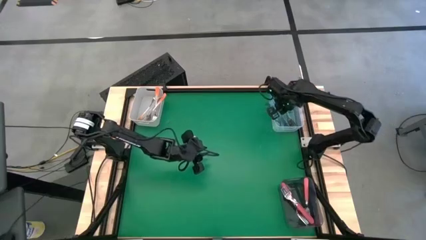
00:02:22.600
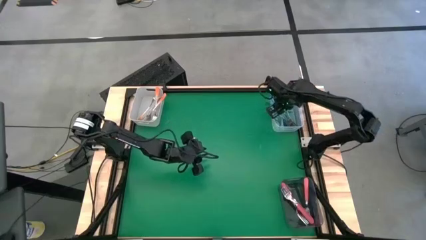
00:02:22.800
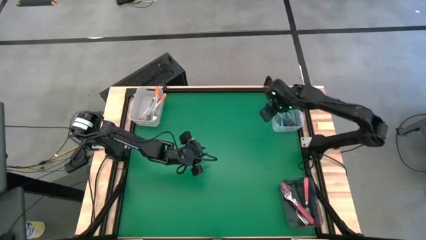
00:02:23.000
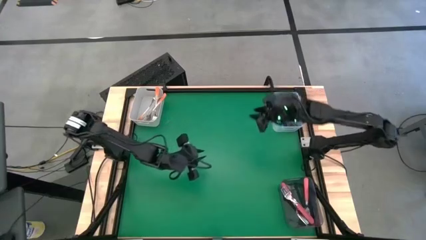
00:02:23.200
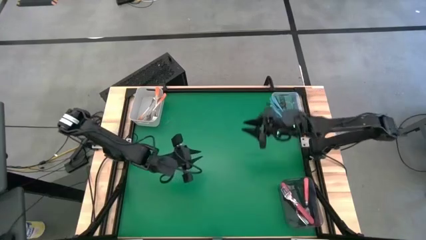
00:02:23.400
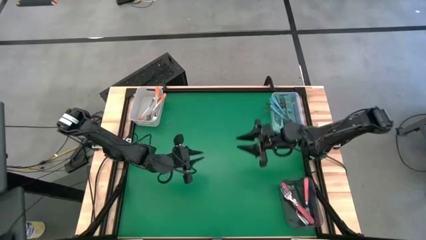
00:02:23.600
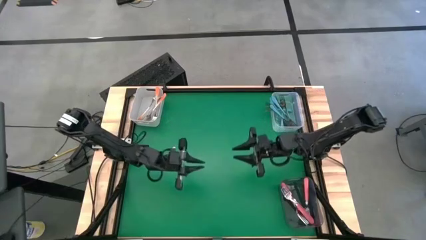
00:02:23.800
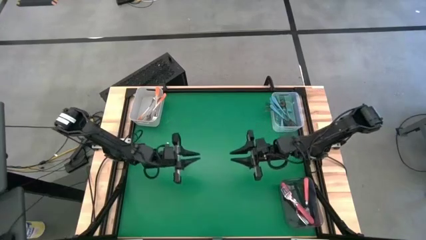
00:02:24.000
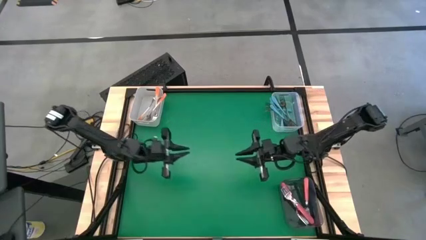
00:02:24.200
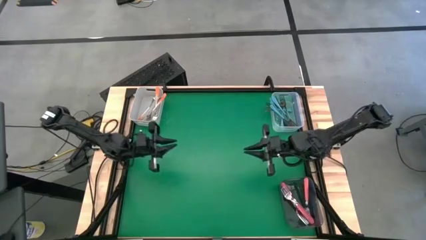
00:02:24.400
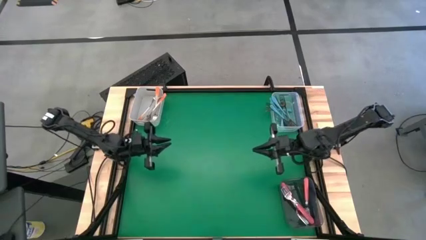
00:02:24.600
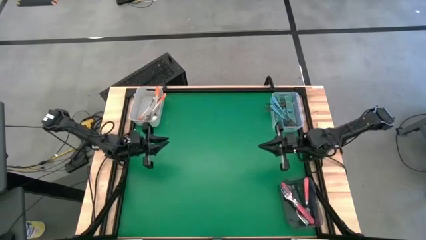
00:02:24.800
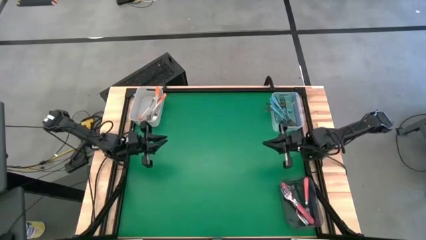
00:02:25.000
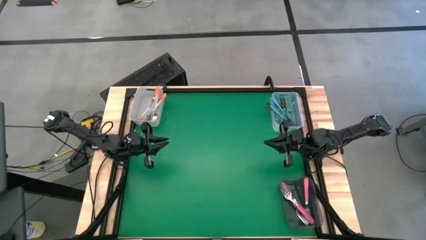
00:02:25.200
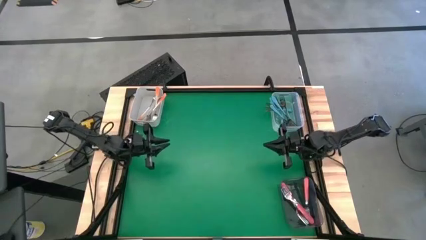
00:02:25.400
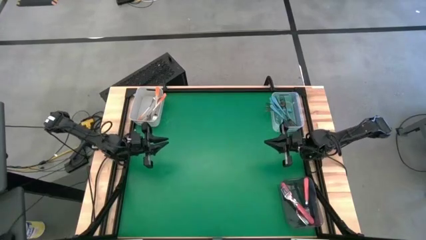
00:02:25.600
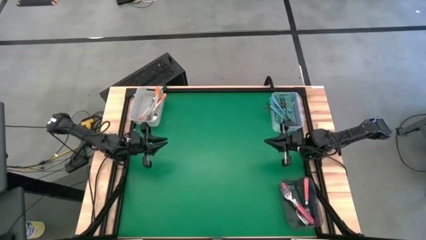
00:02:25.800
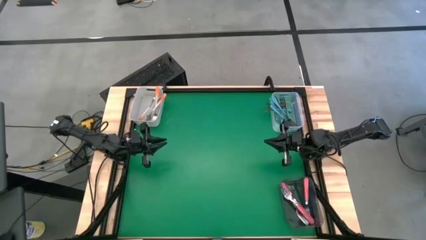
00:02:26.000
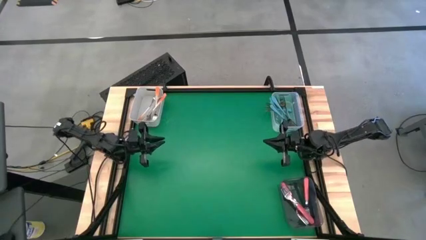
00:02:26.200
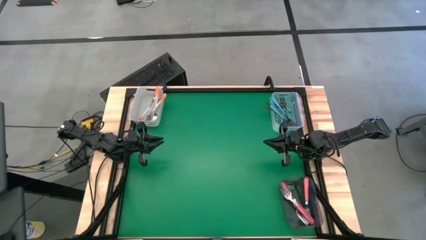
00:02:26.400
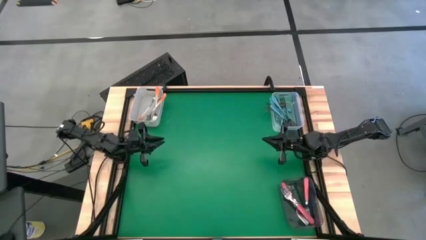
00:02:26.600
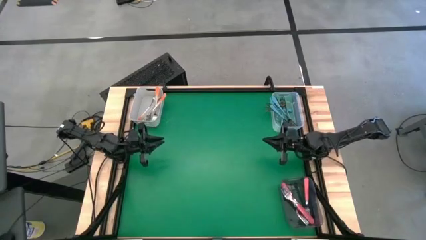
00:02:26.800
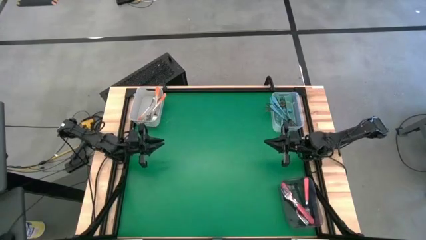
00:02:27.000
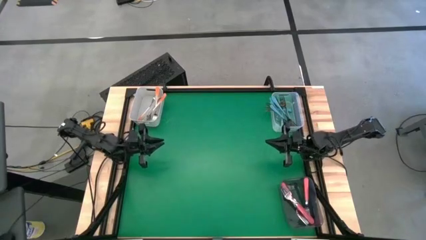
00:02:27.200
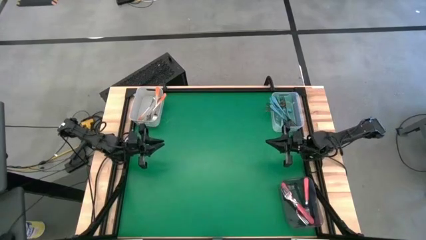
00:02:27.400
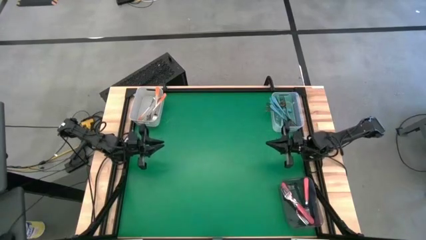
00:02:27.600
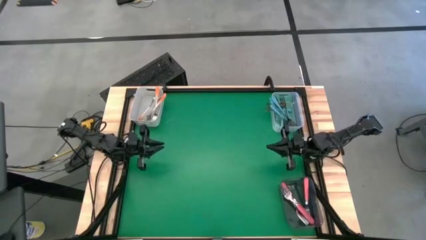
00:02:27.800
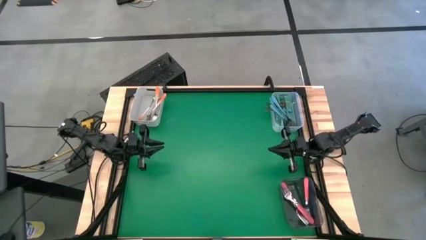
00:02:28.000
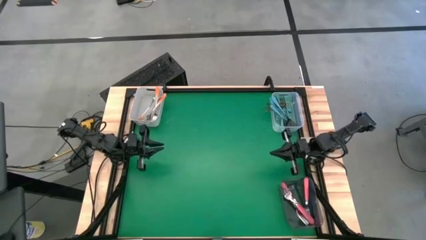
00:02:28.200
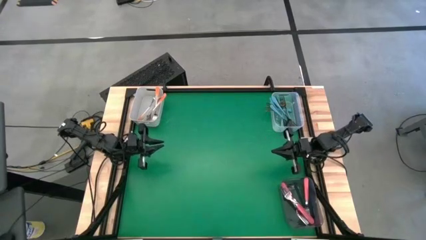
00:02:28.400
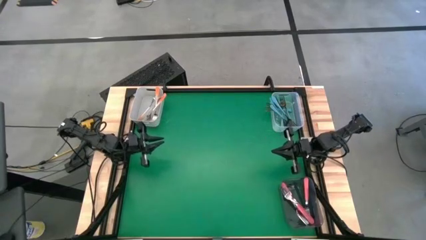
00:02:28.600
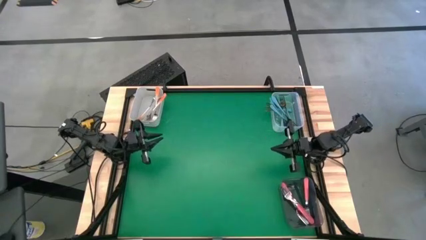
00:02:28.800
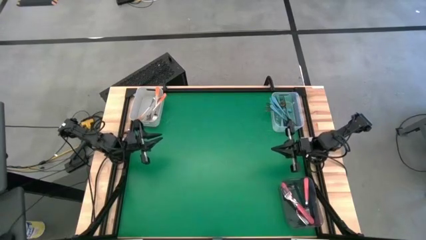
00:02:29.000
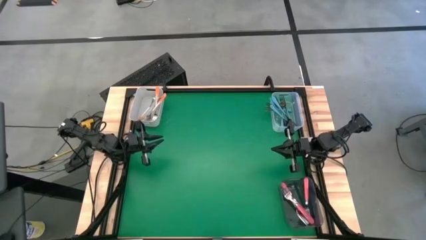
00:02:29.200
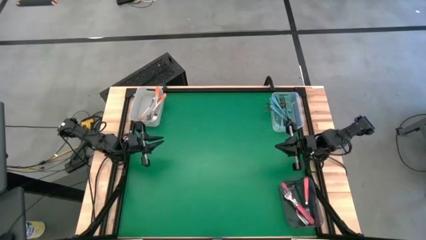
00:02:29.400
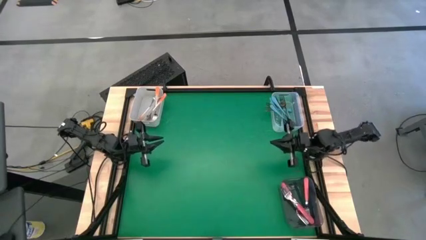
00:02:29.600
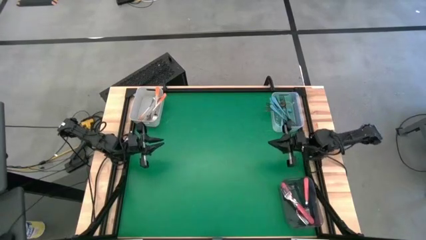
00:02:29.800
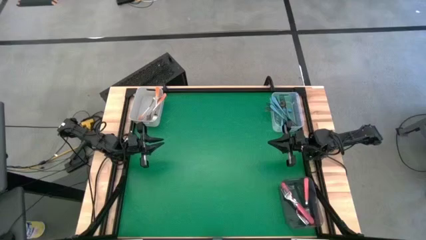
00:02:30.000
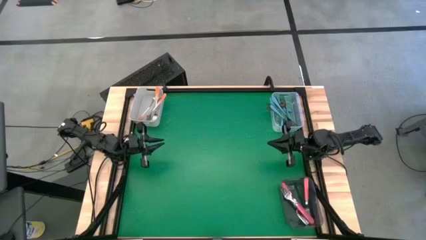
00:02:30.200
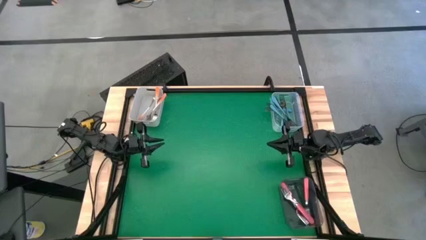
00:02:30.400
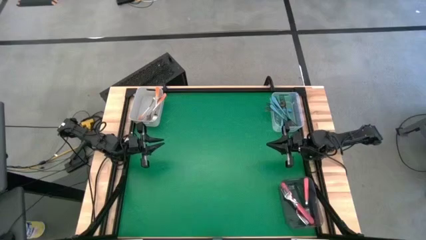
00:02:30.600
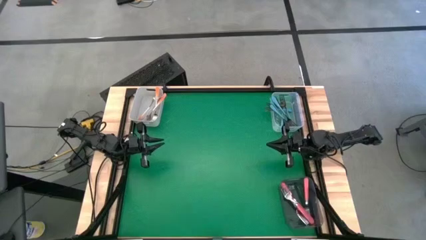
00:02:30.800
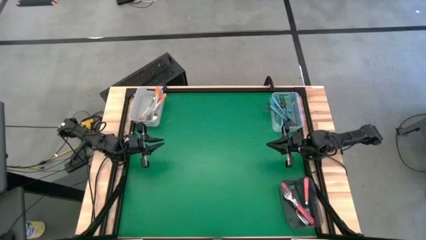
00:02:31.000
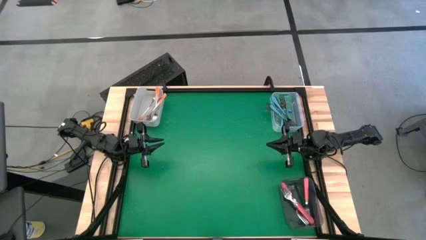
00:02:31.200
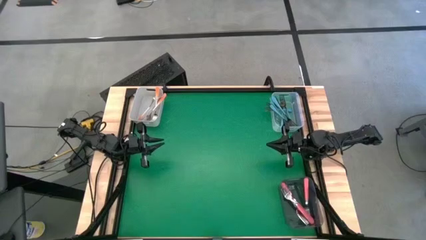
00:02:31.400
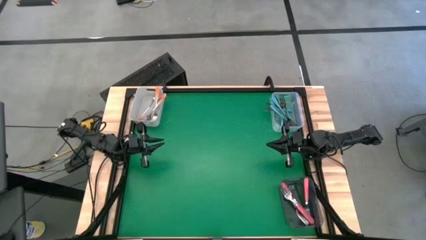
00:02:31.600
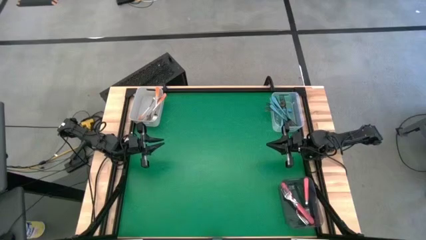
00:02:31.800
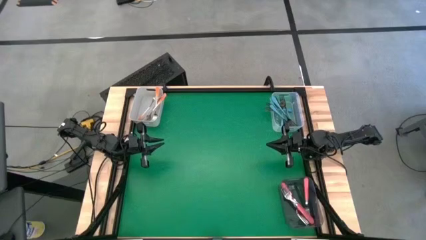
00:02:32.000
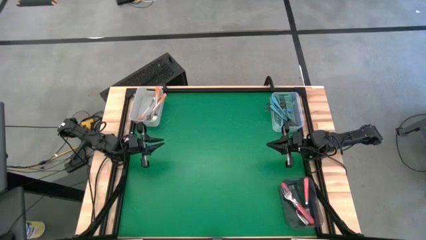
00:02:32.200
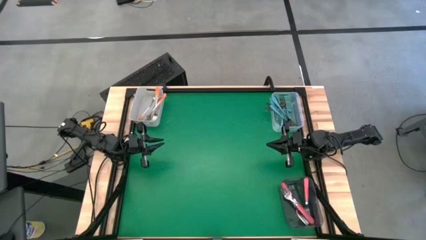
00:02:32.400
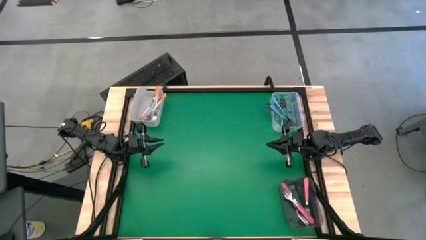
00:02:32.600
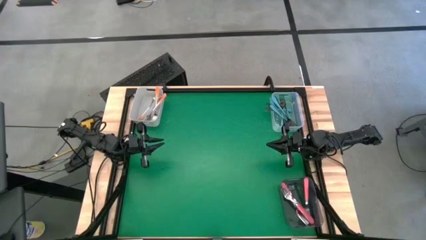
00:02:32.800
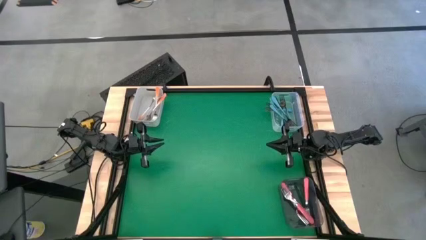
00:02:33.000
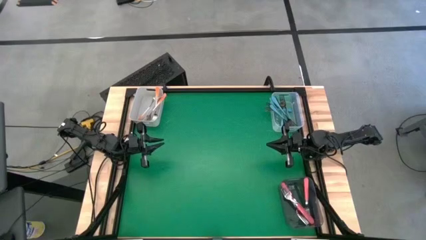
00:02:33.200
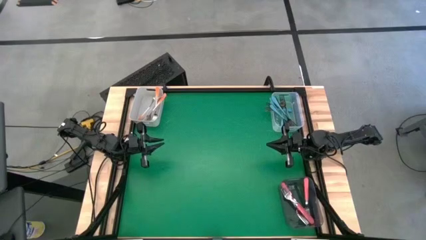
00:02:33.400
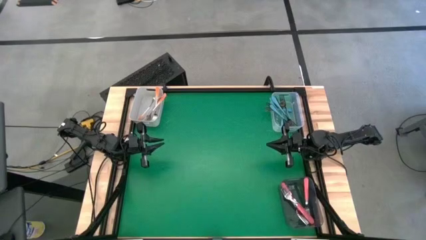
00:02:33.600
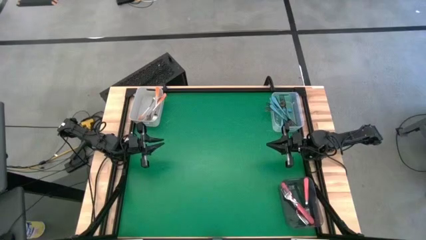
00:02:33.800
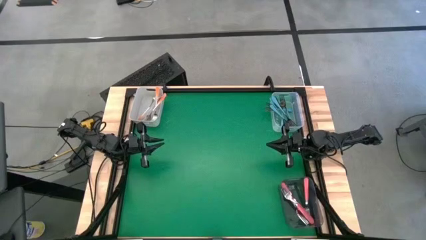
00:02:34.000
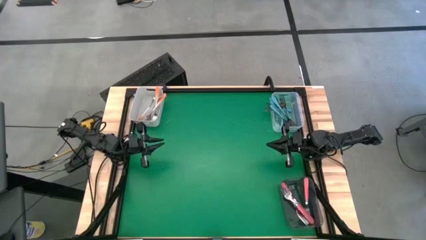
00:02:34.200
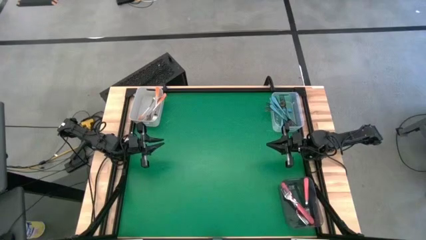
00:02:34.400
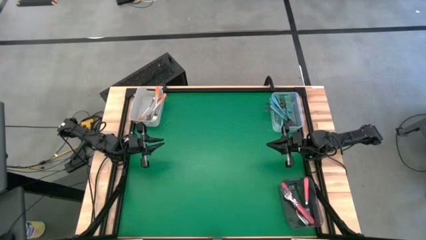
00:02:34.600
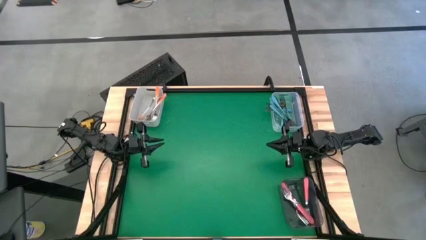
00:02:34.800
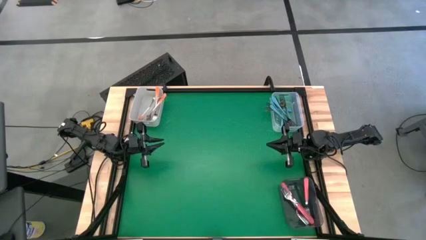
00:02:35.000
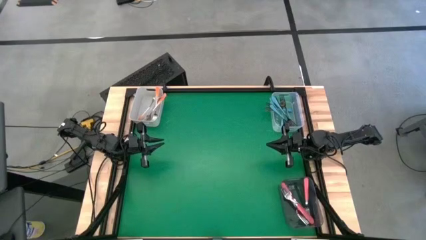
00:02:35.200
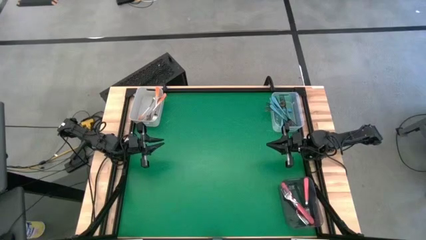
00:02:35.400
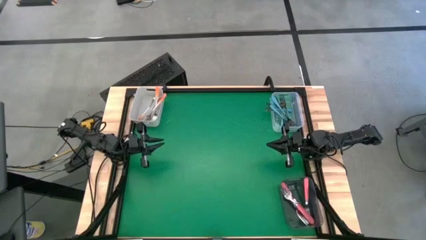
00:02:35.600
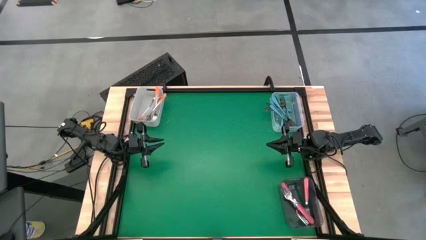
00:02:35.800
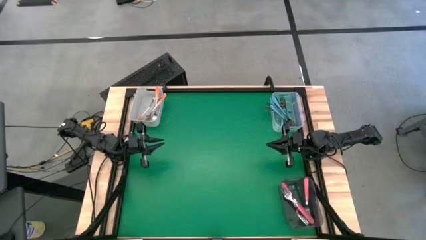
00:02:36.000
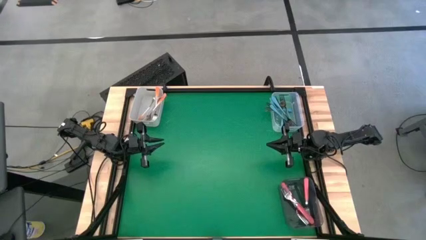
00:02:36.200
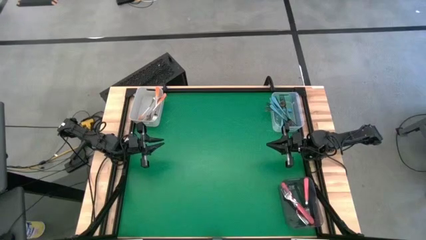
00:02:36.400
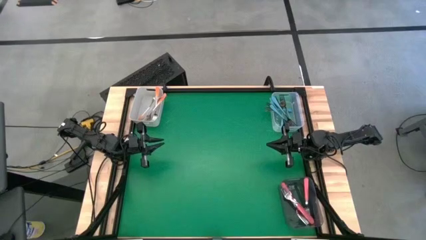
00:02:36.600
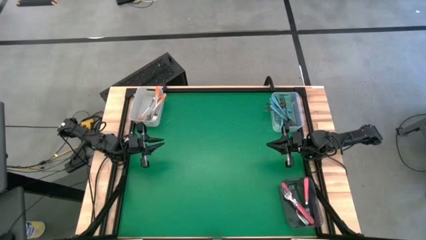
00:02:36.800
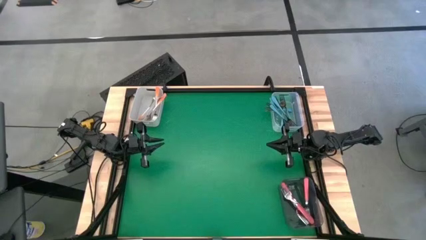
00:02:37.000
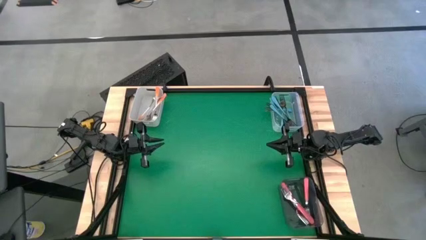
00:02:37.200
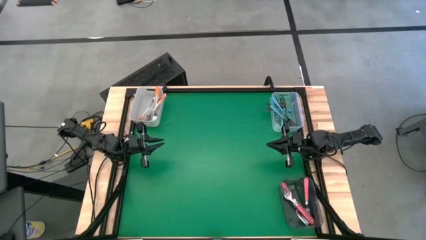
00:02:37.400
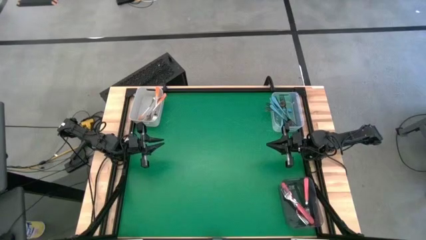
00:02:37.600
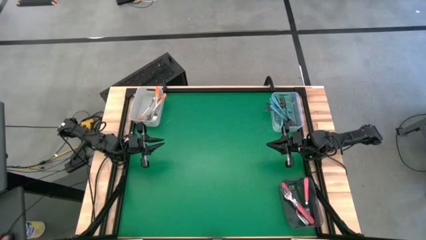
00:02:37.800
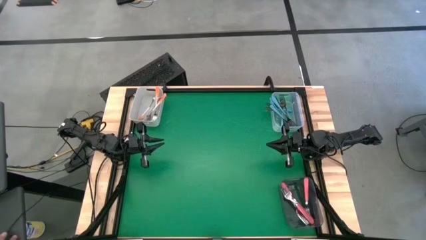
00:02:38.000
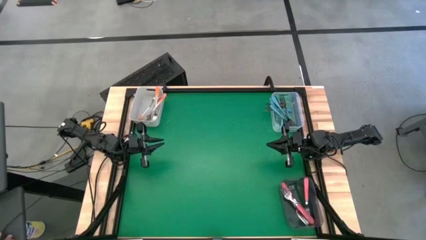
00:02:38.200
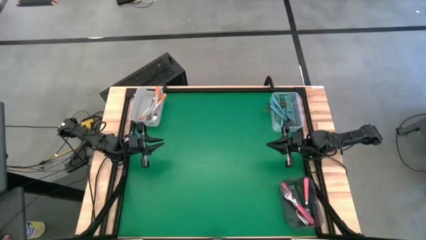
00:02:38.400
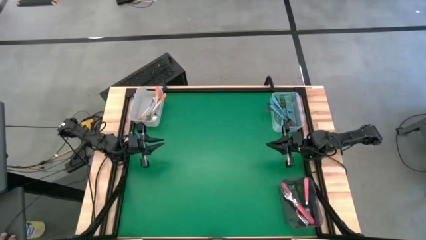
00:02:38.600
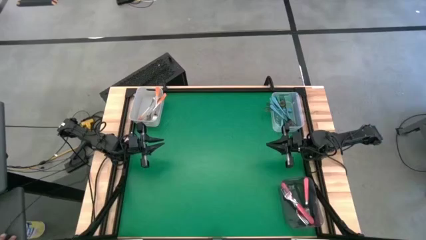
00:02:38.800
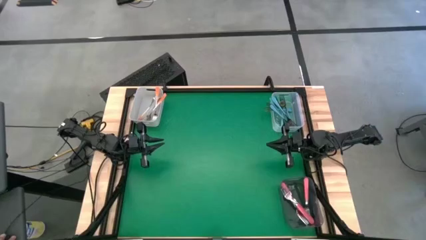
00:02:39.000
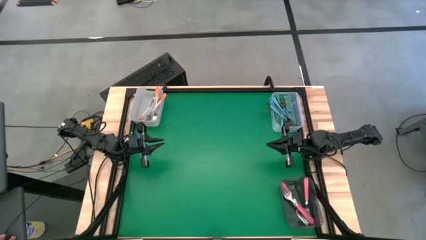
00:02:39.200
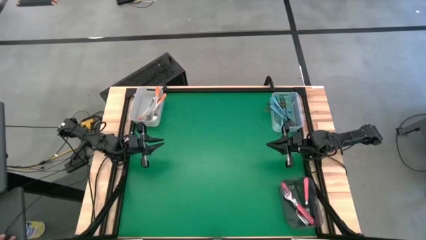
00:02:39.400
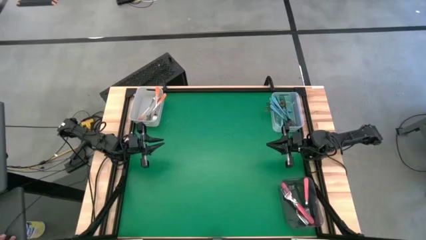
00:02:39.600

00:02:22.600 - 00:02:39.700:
Task: Sort silverware by color (type)
Return to Home Position
